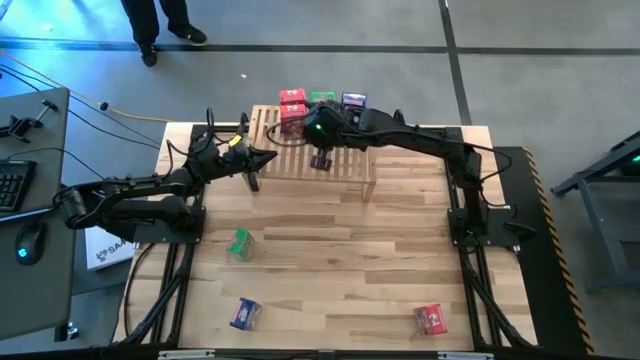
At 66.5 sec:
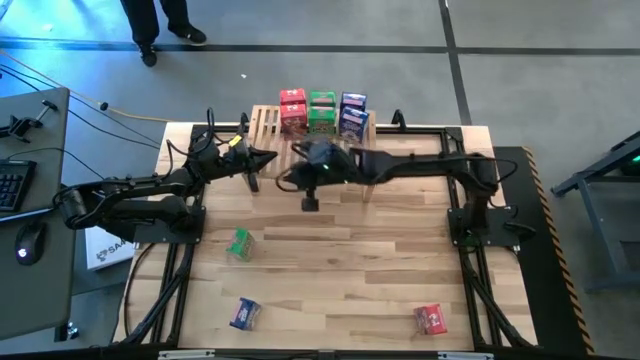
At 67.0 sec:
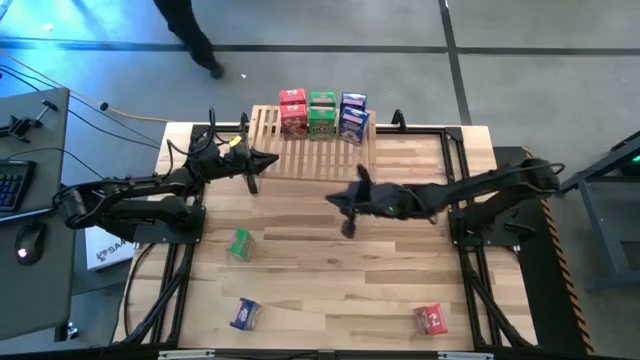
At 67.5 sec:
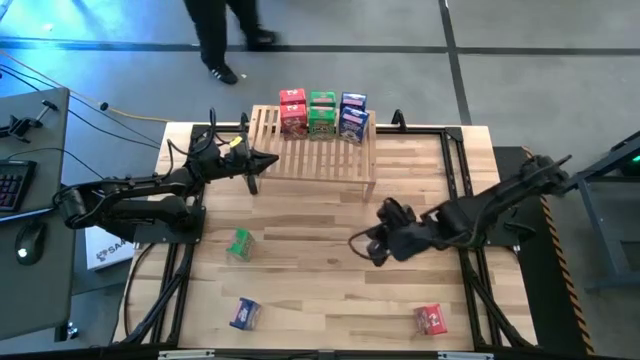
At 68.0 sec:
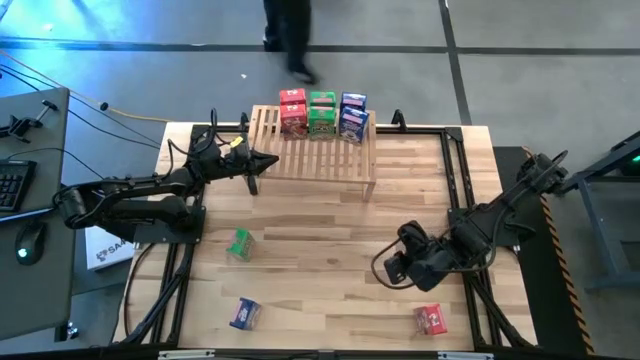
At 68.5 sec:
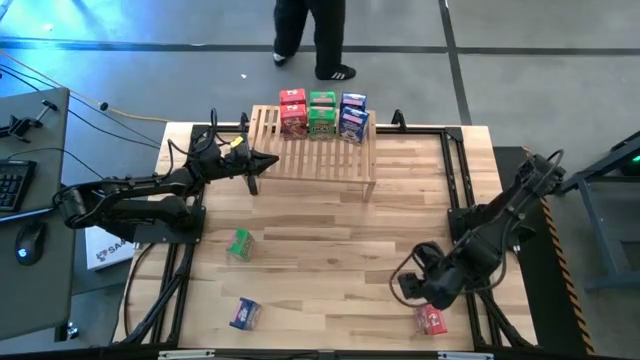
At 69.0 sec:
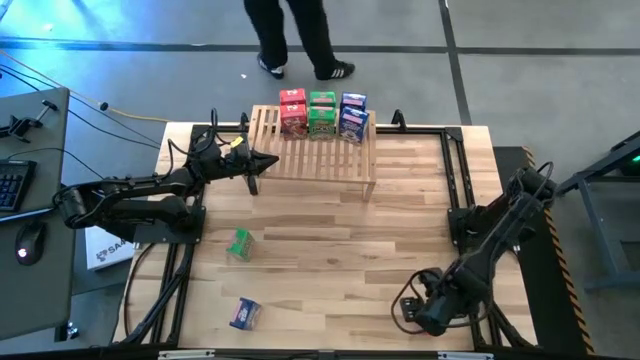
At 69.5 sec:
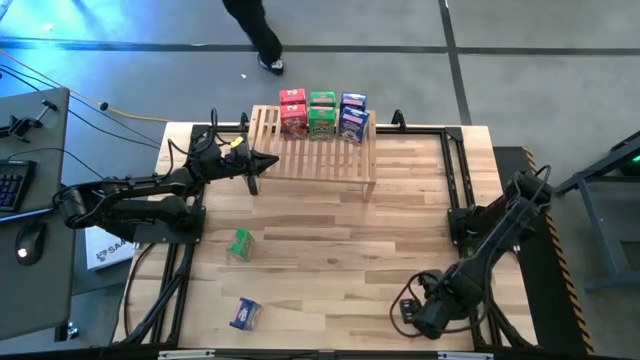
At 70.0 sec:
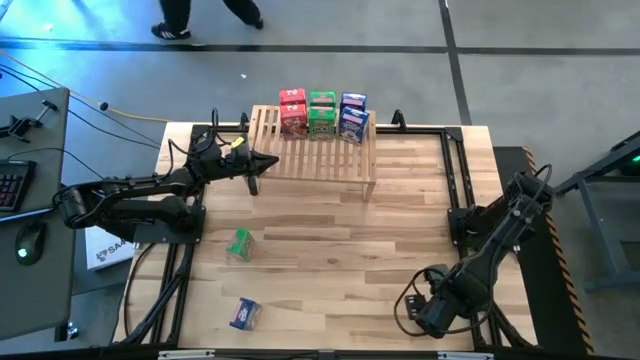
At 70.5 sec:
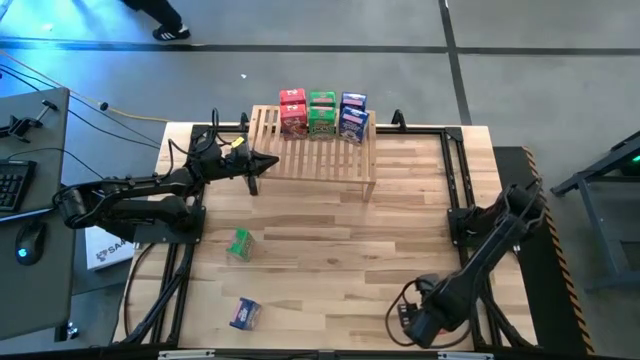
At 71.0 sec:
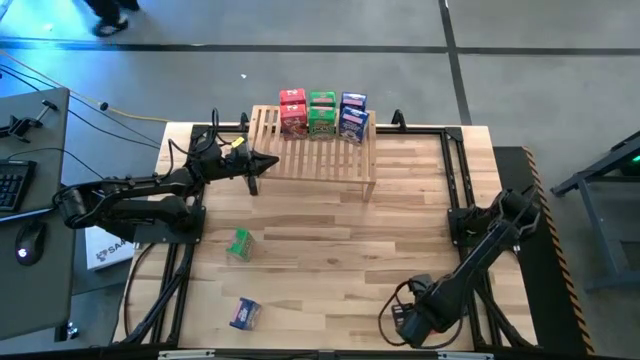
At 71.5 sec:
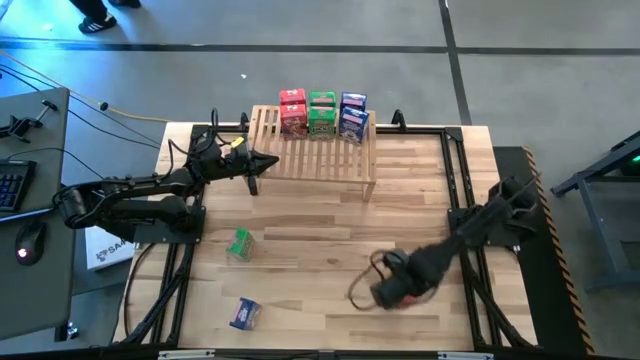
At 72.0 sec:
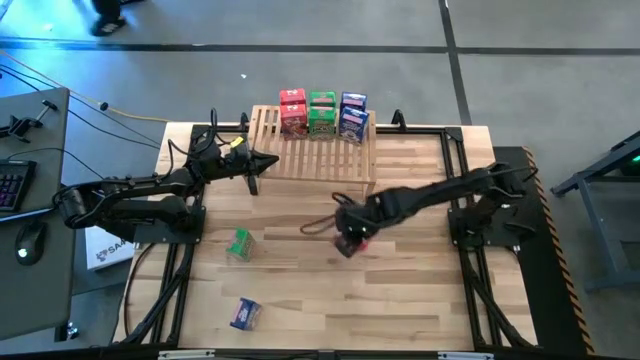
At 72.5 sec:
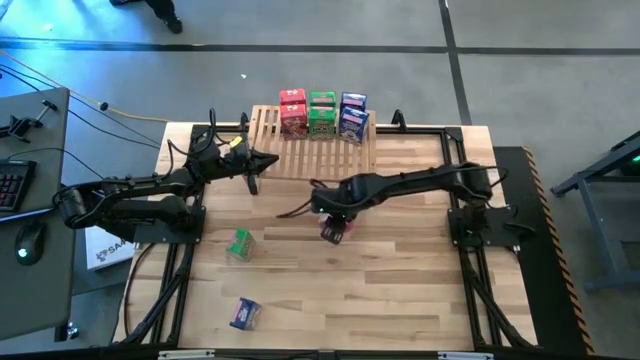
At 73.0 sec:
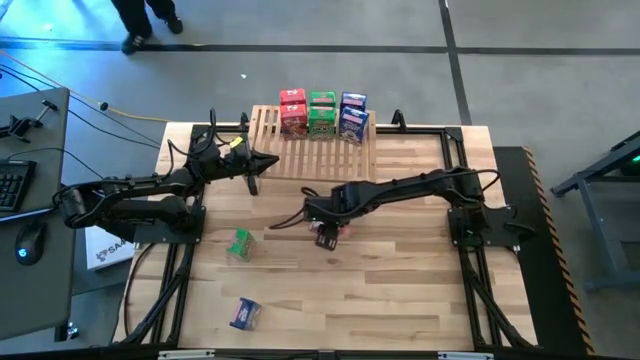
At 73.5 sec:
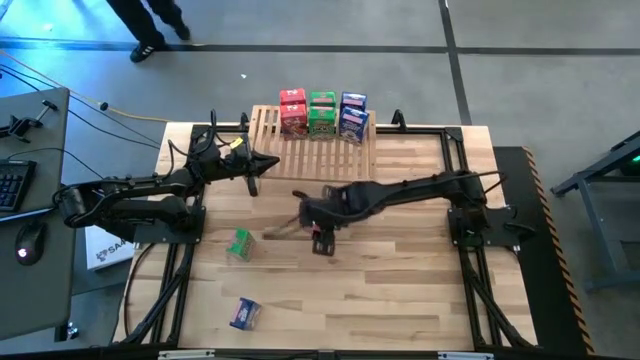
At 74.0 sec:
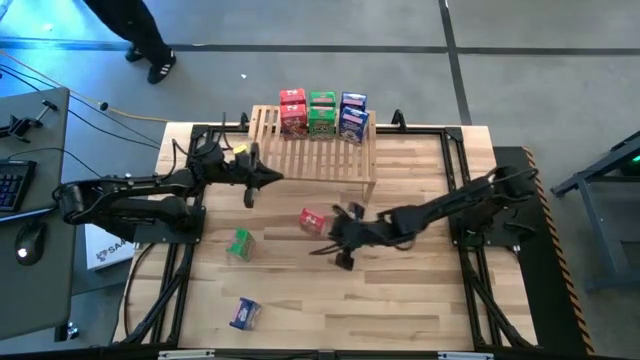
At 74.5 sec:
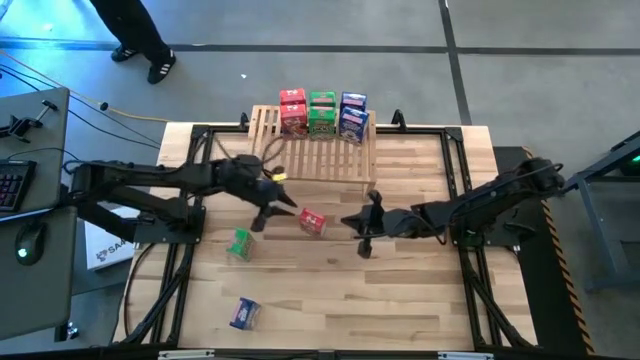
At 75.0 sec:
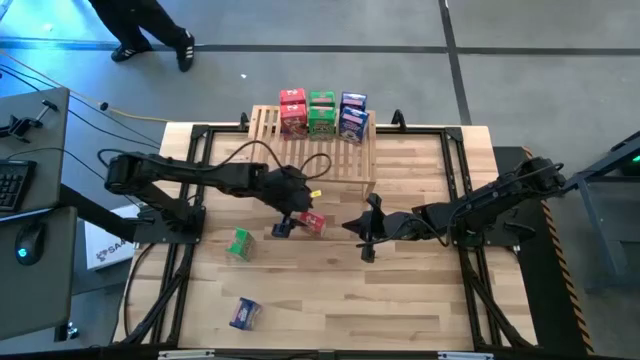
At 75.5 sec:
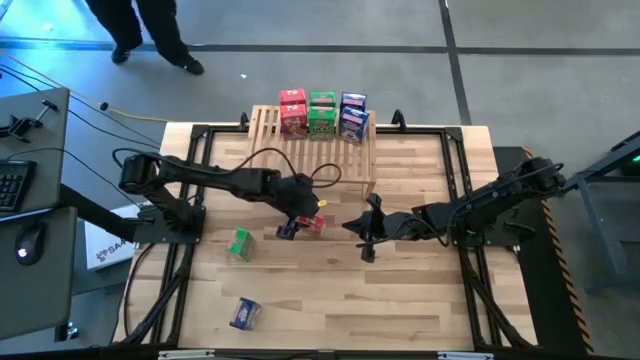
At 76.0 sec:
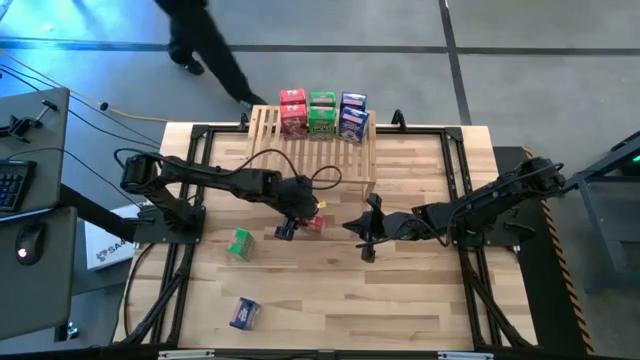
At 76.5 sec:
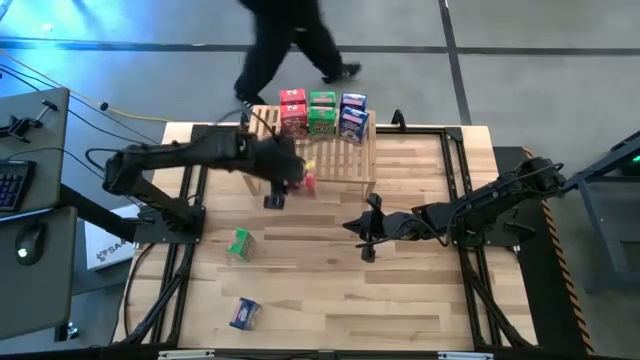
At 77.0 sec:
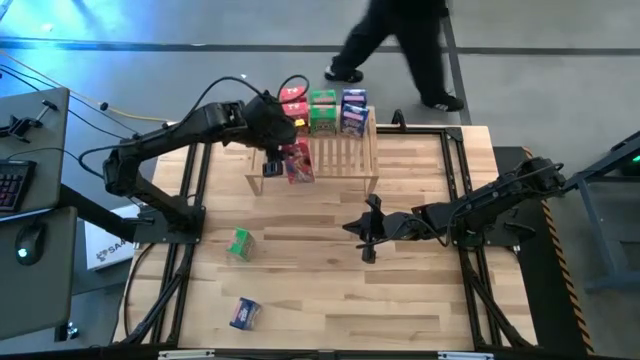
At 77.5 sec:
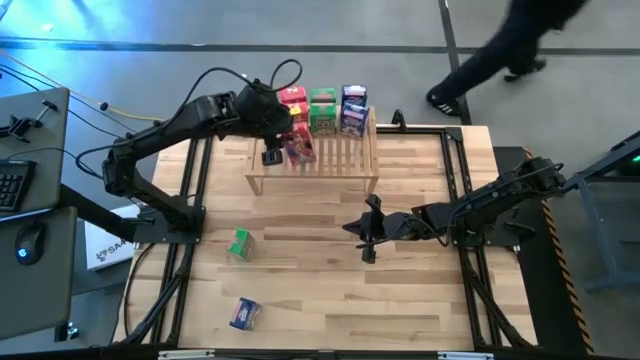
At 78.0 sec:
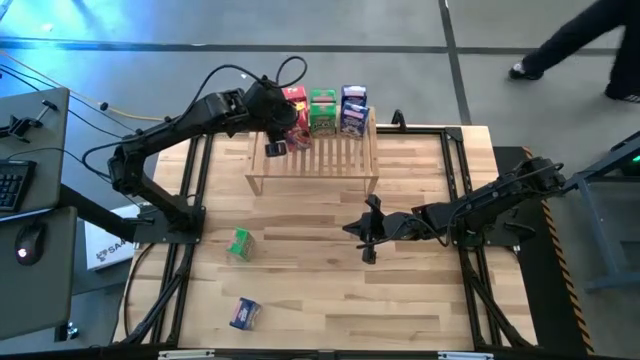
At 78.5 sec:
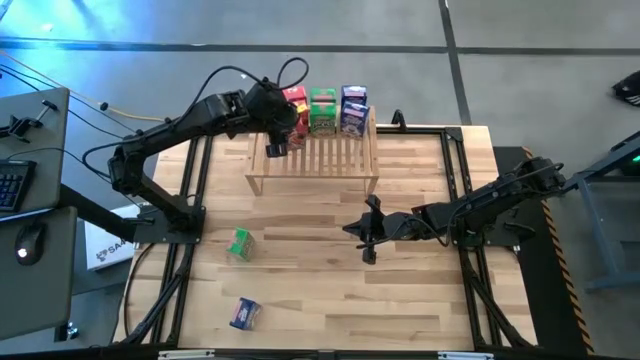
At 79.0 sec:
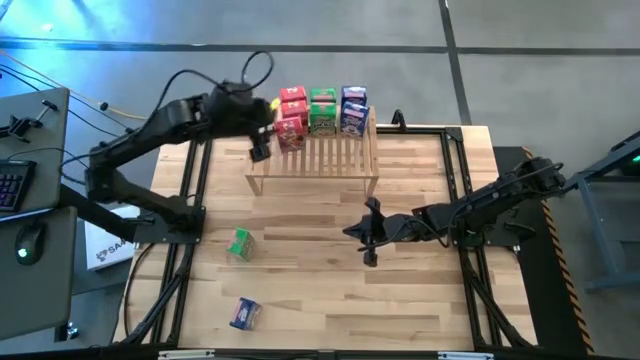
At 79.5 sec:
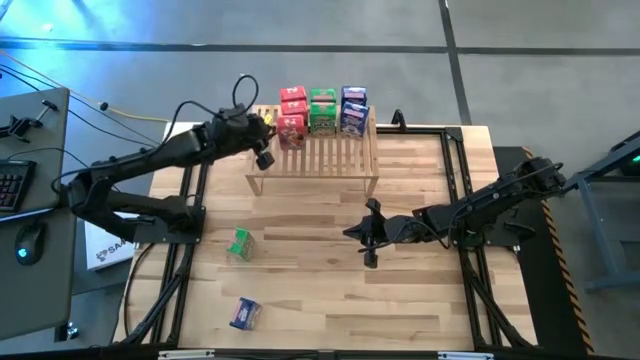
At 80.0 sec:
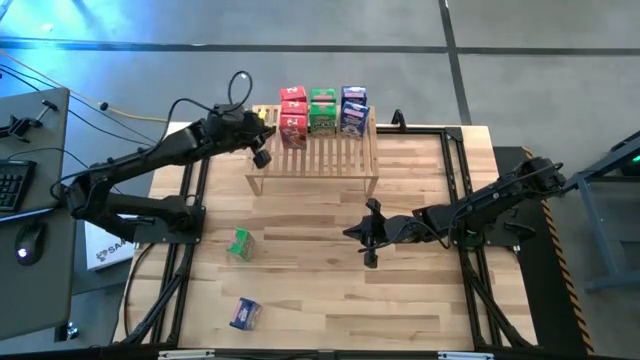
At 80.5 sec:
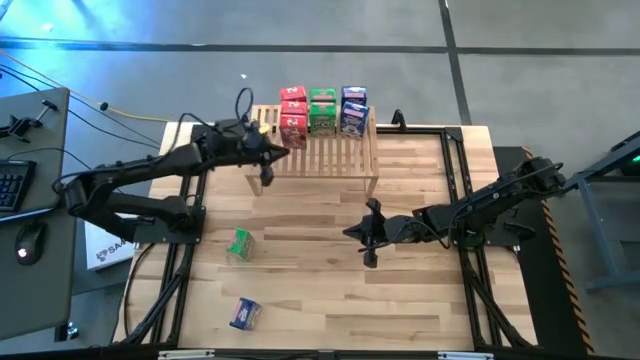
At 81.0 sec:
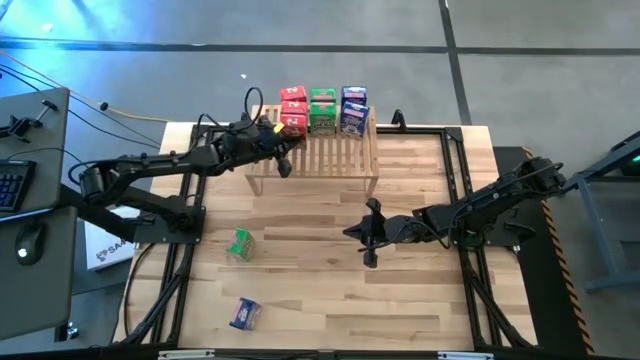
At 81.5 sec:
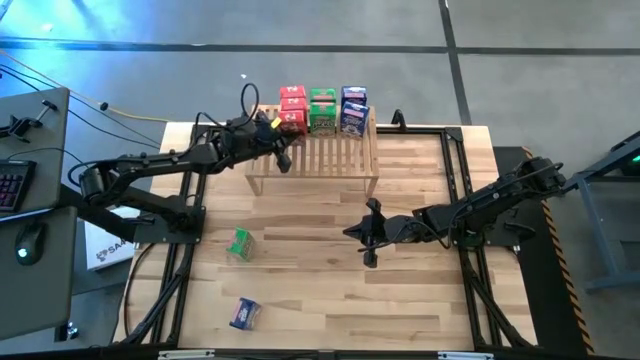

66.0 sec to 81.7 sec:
Task: Stack cereal on shelf
Put the red cereal box on the shelf aligned with the other red cereal boxes
